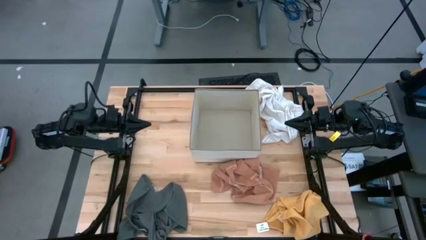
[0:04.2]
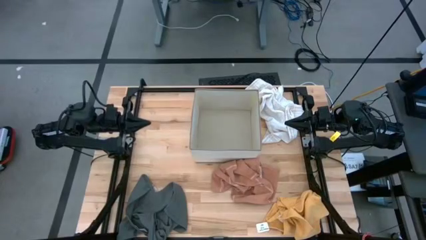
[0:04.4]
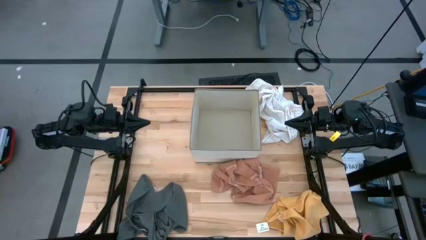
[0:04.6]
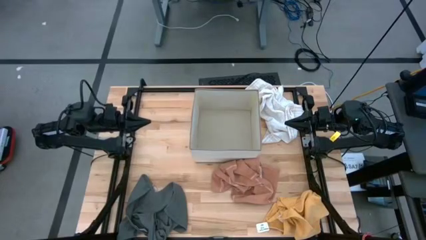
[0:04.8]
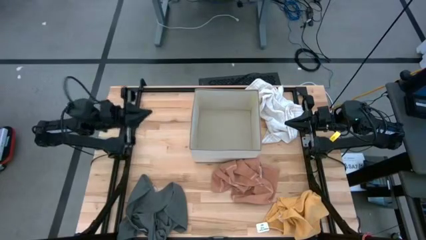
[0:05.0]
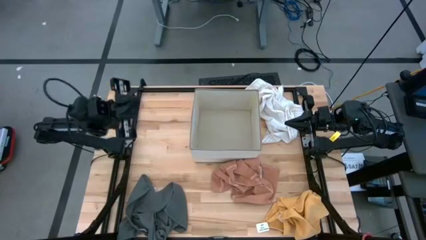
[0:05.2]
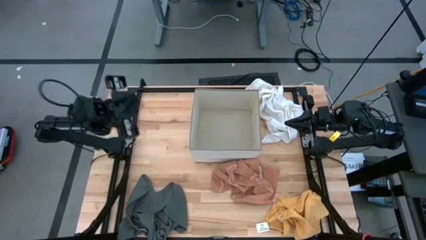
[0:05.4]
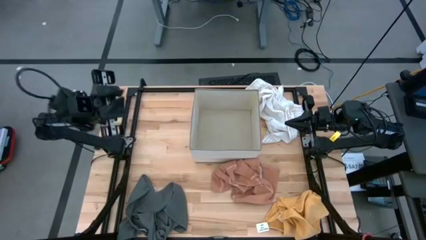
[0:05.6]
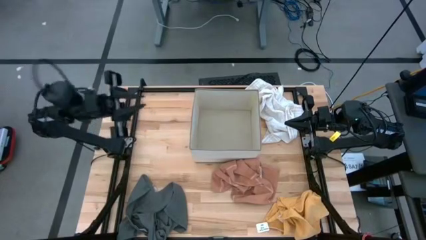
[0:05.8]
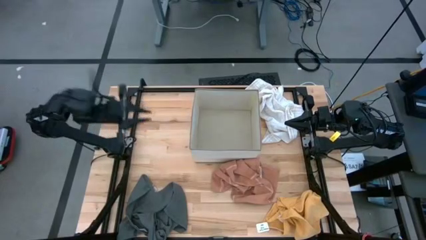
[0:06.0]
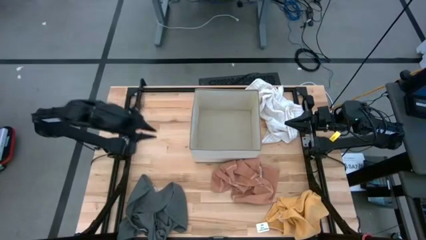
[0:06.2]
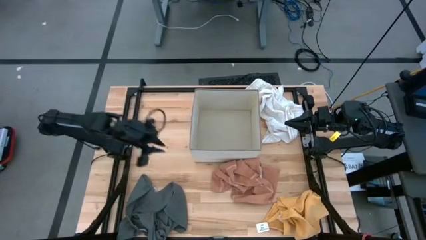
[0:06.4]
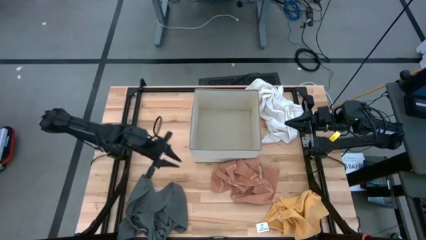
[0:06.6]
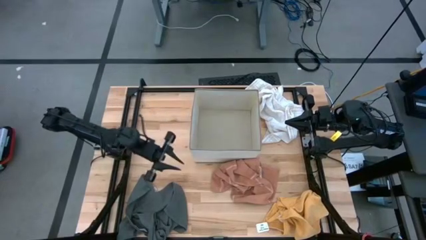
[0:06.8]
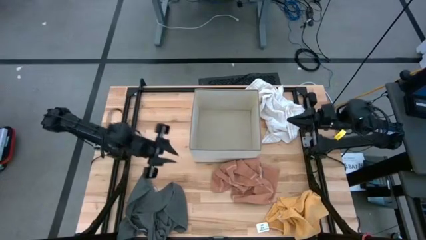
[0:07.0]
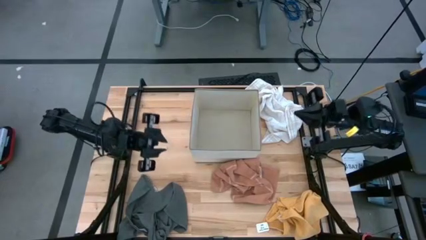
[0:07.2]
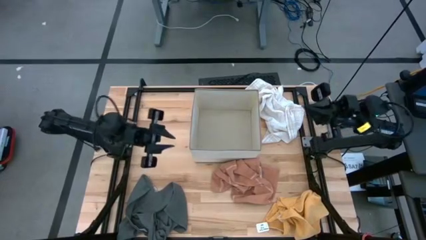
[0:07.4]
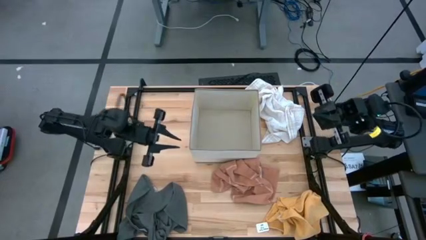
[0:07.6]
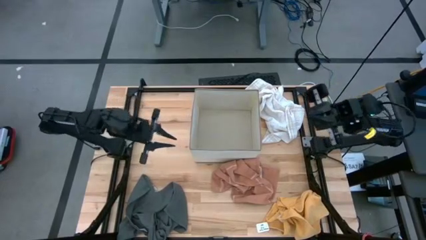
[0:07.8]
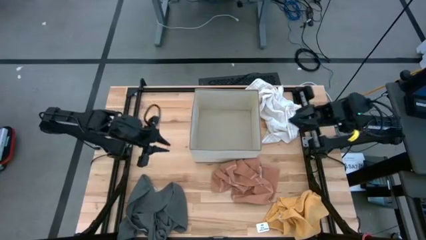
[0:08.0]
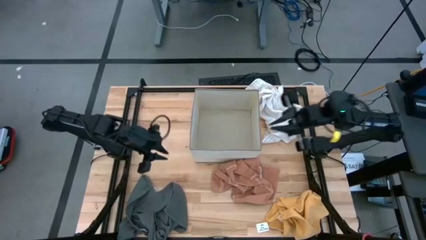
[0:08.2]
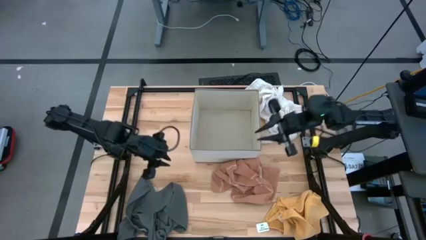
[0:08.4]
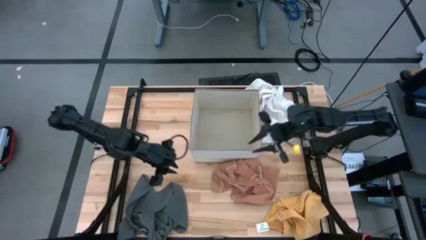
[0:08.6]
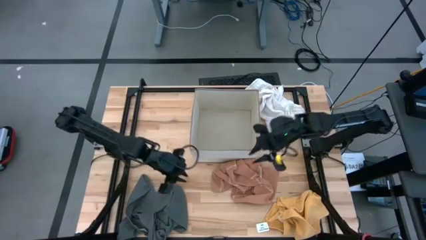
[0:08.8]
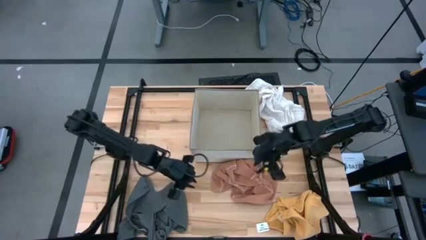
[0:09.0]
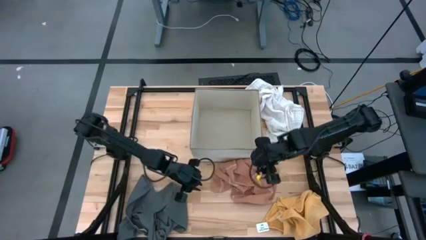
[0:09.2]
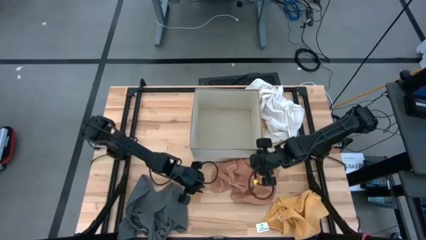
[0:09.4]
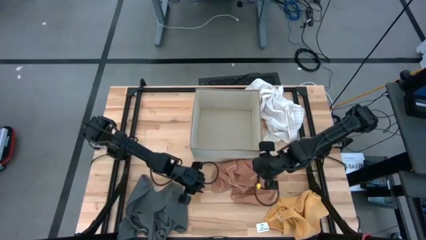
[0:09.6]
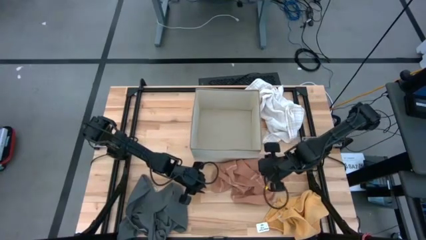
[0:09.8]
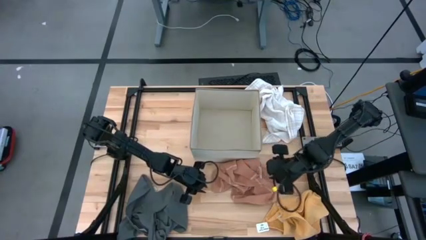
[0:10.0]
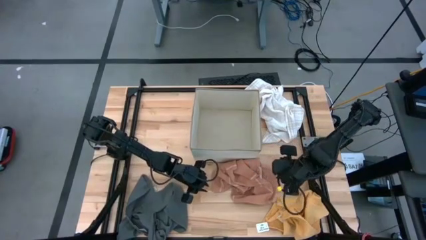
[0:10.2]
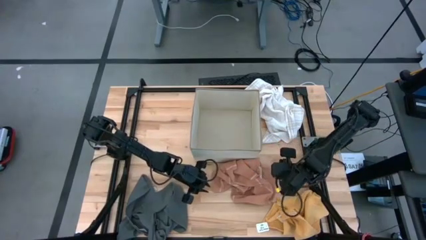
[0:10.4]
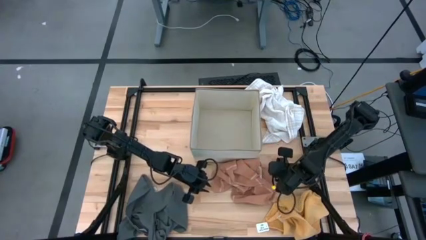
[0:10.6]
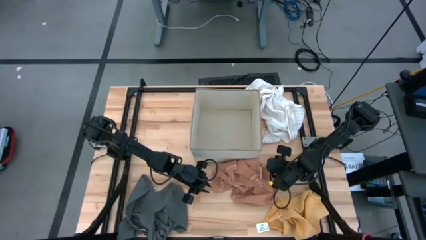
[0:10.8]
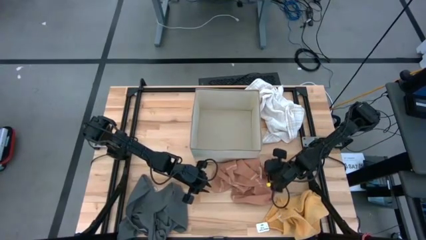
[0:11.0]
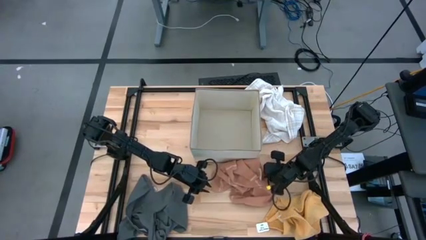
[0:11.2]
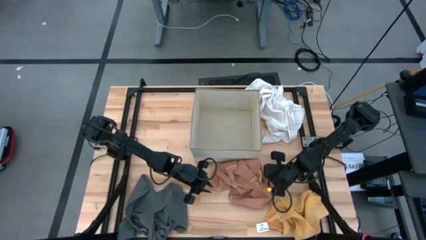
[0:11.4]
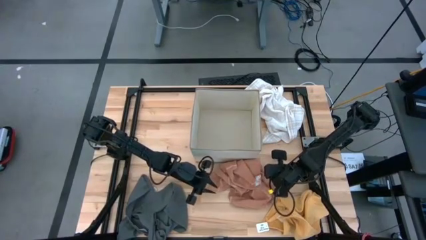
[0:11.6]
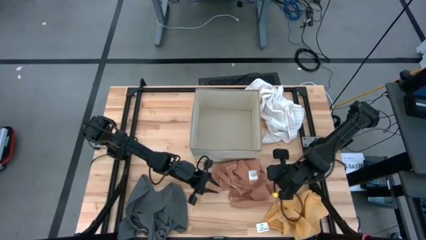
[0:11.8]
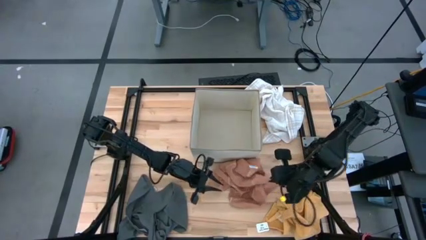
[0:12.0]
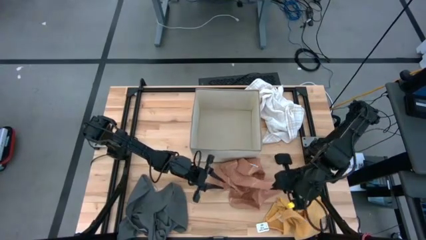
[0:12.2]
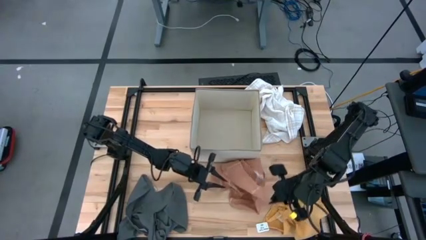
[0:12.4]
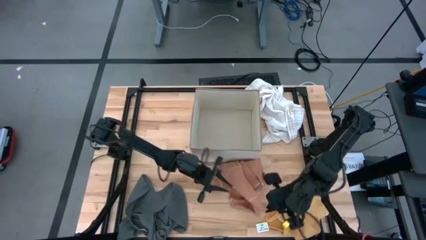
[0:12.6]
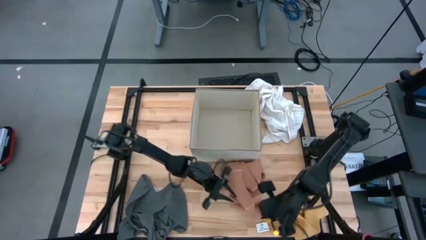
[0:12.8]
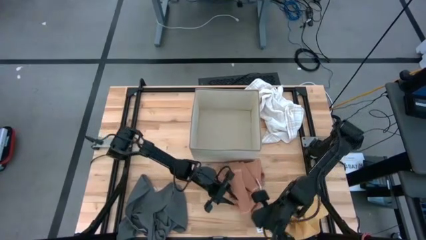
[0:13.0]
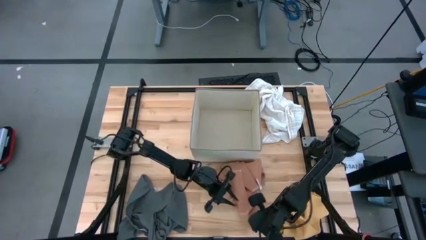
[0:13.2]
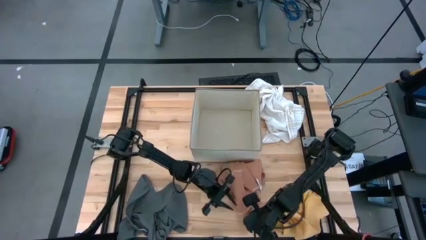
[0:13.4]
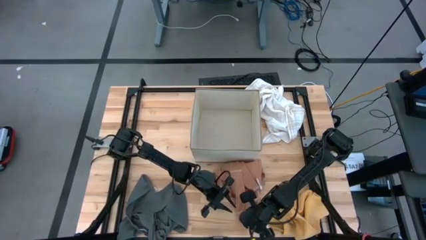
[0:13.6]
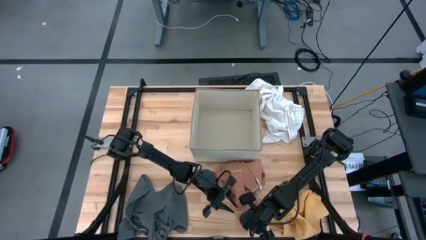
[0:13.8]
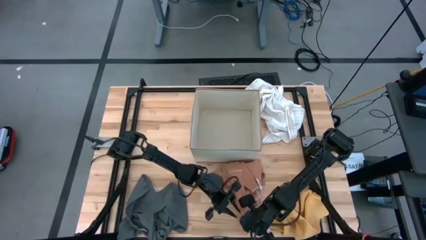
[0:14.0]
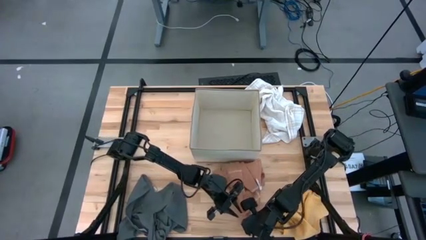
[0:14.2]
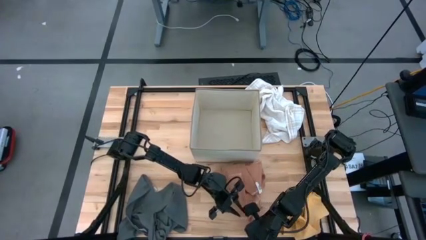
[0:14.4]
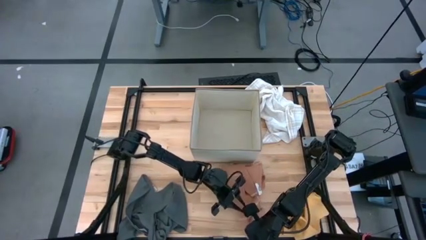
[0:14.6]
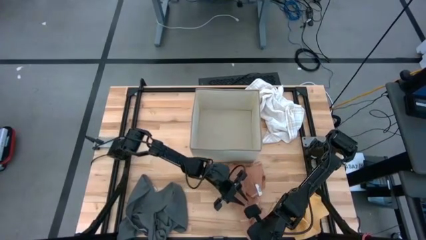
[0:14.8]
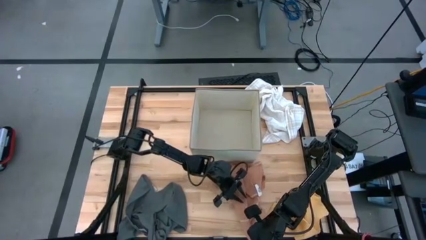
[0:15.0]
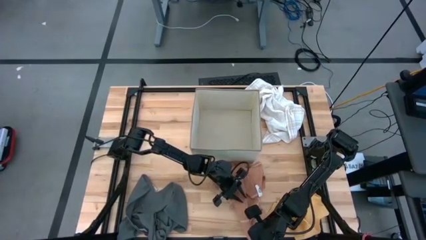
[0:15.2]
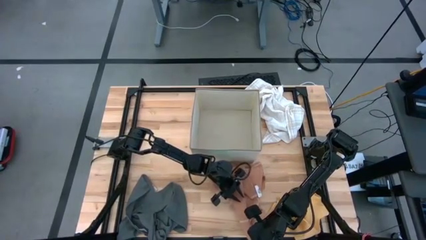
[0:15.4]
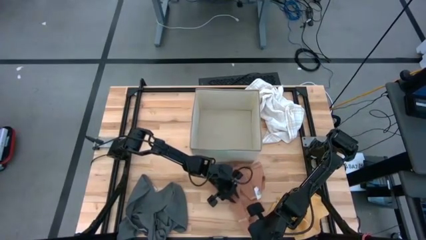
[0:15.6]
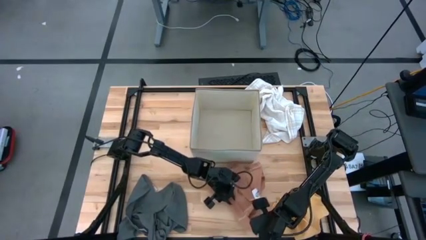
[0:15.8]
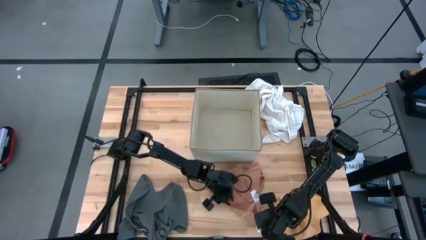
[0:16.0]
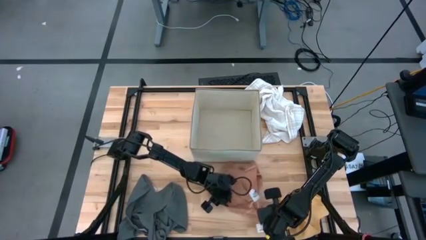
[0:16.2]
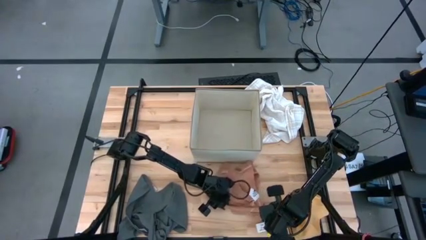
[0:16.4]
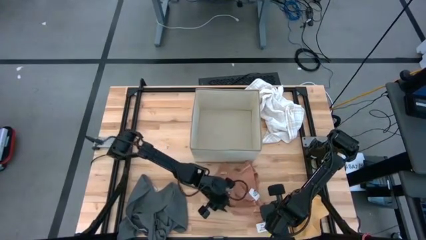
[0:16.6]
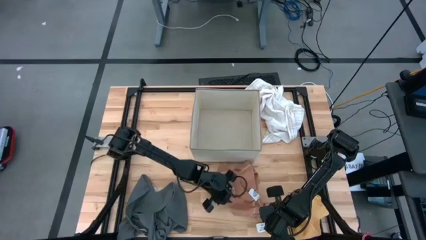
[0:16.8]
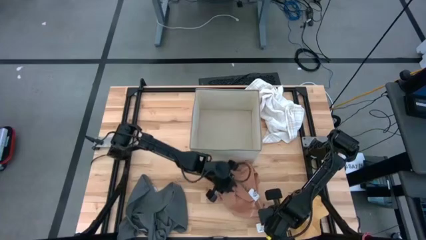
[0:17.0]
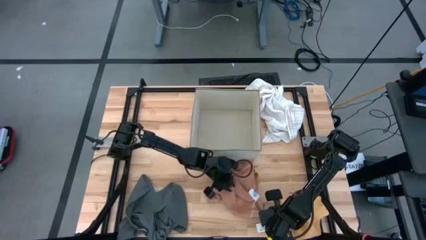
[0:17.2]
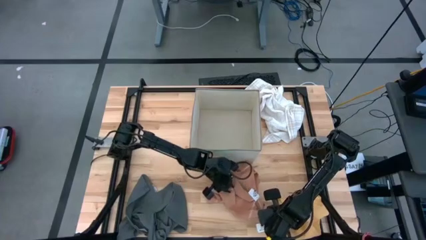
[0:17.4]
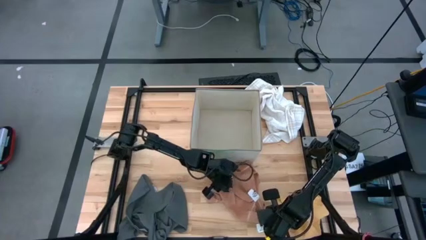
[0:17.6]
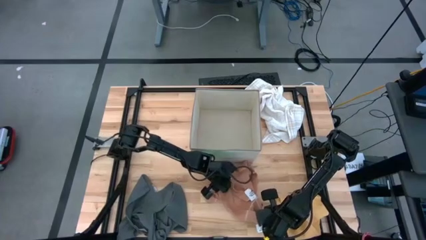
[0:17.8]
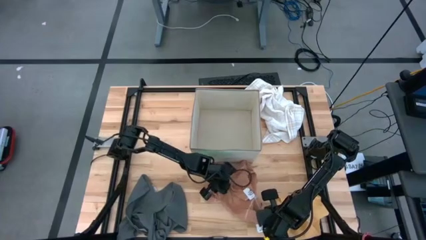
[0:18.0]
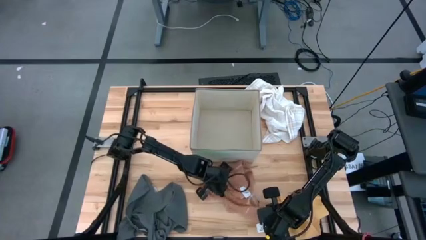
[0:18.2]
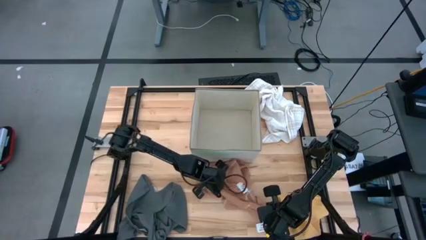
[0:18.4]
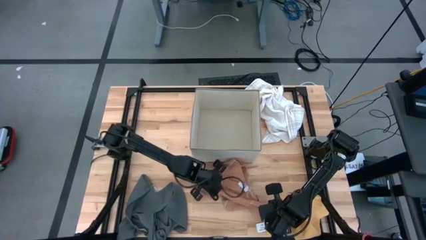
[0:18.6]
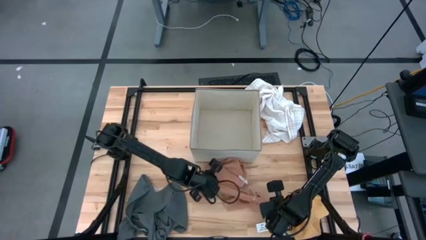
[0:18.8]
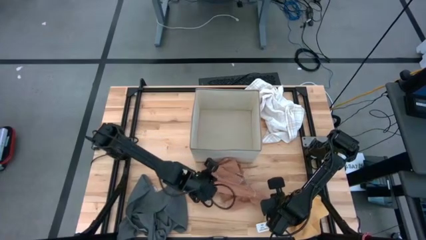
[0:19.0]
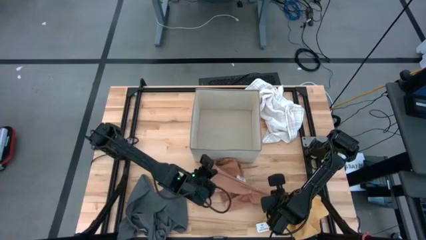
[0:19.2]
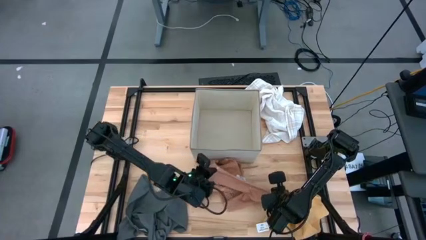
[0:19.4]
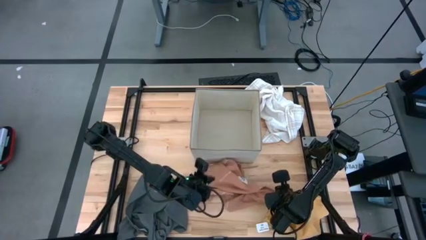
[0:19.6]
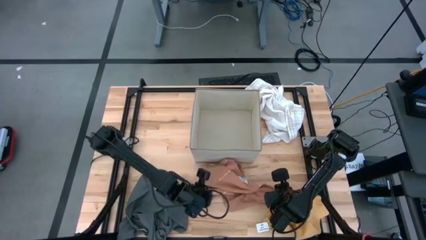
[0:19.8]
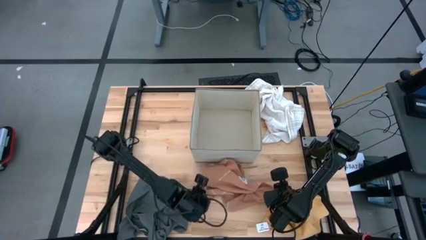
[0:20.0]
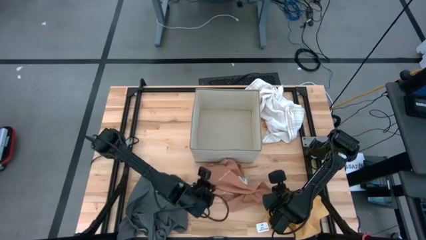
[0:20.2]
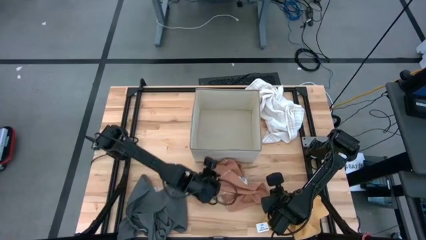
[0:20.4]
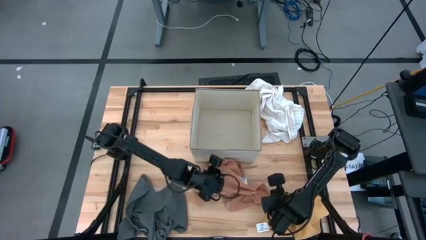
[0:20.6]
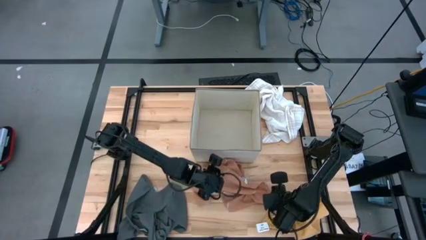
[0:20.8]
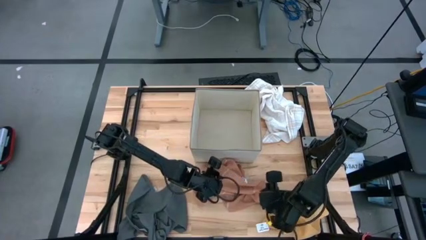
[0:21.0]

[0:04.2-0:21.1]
Task: Fold towel
Fold the brown towel
